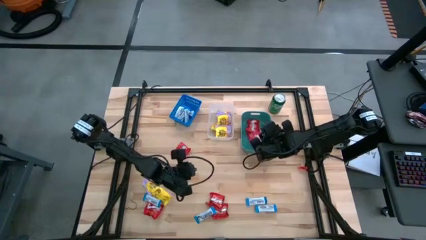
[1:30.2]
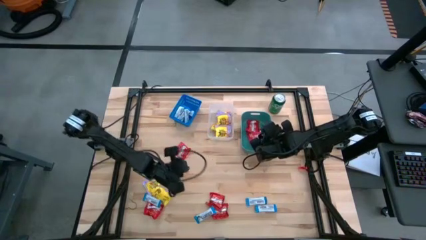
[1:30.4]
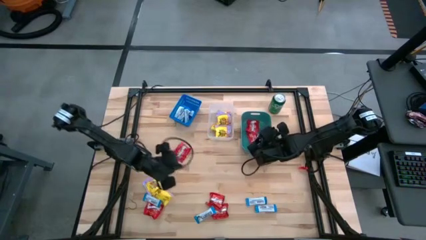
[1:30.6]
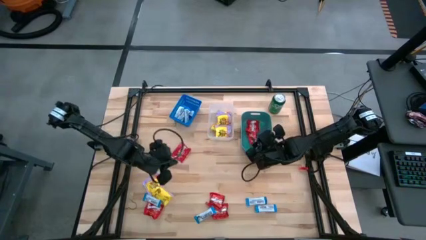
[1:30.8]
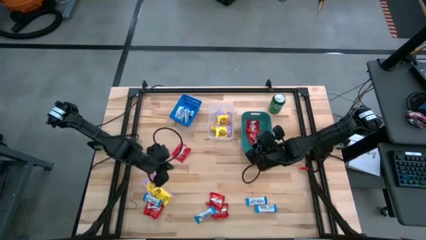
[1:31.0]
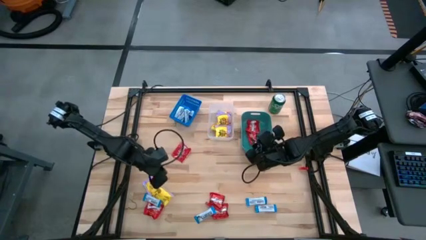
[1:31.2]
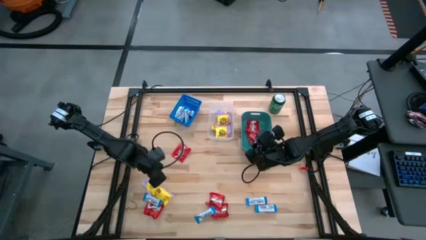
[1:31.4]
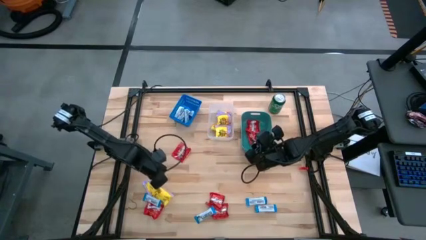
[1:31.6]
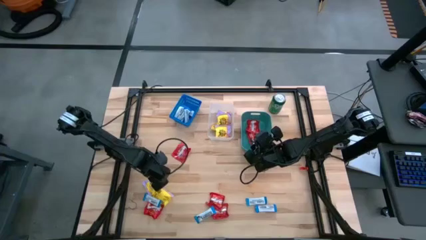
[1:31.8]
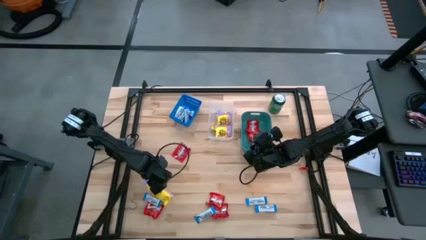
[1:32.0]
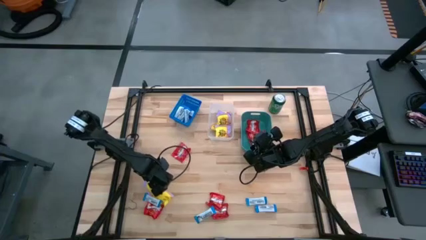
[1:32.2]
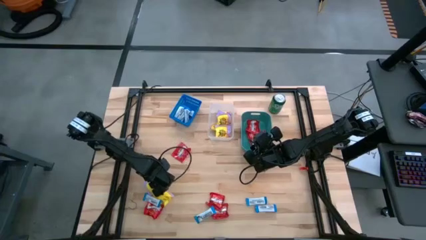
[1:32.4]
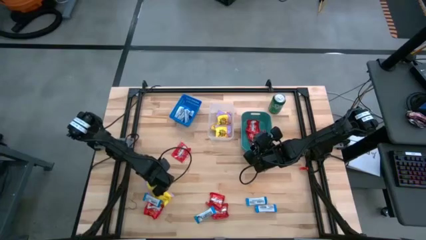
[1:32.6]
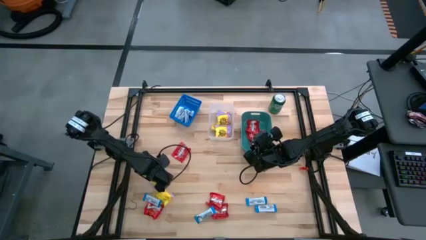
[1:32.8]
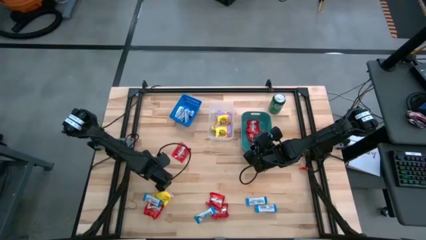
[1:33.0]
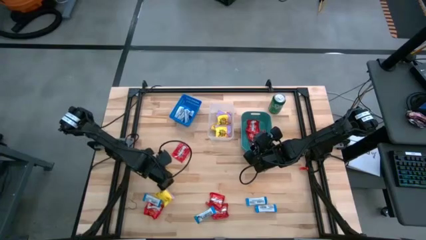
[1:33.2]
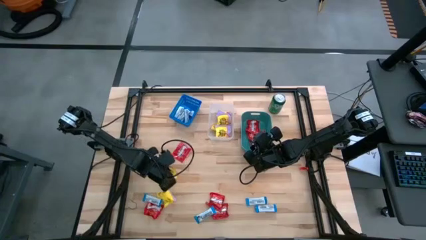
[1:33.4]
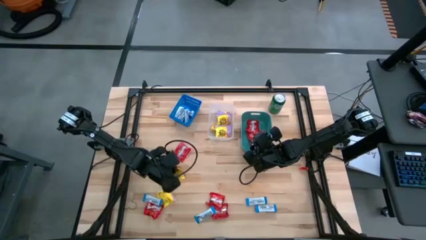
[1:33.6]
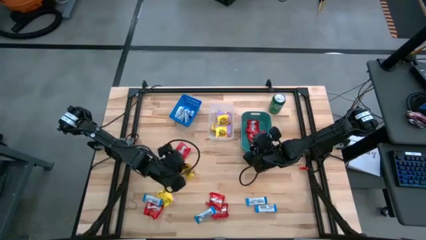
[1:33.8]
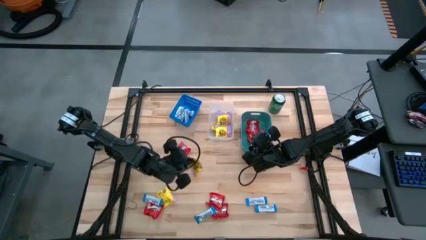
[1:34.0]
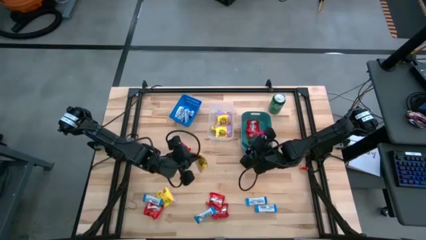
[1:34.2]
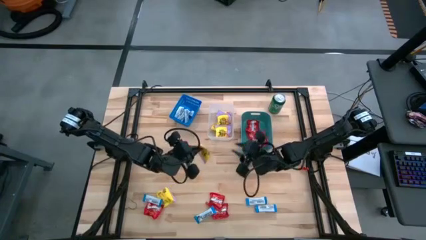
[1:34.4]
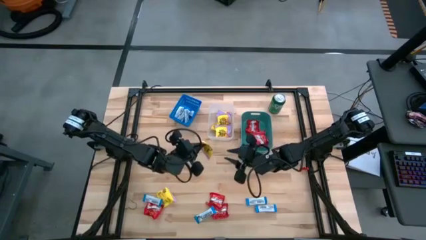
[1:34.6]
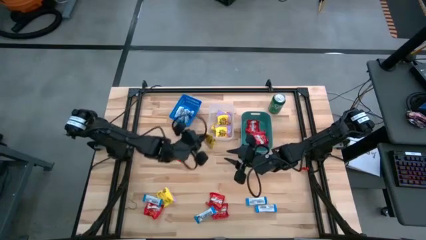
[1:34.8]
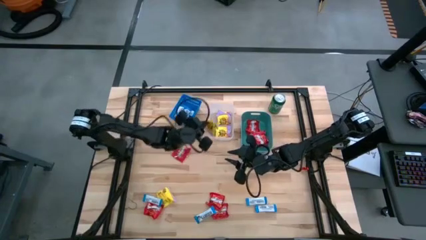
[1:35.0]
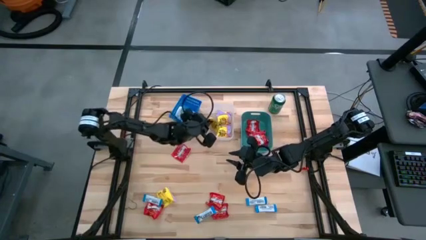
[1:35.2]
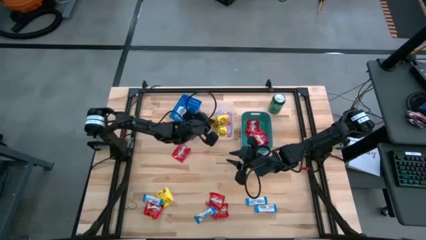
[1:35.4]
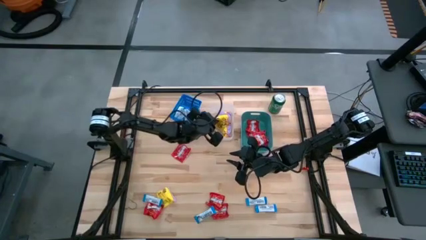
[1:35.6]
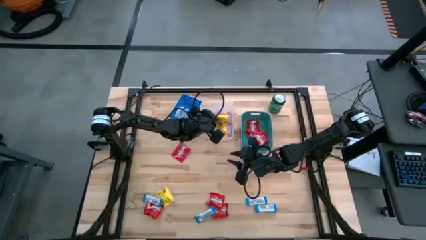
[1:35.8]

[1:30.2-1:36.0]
Task: Sort candy
Put the yellow candy into the transparent bin

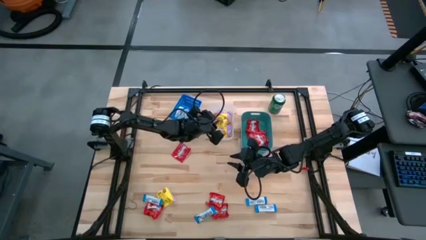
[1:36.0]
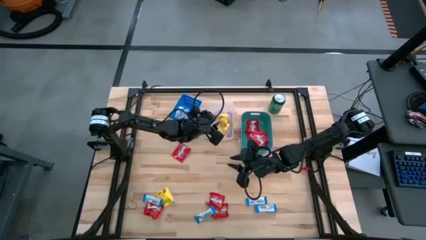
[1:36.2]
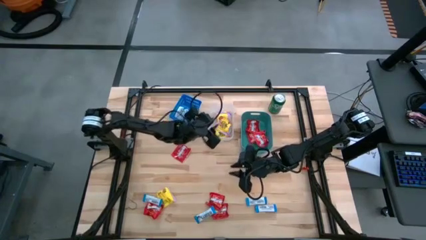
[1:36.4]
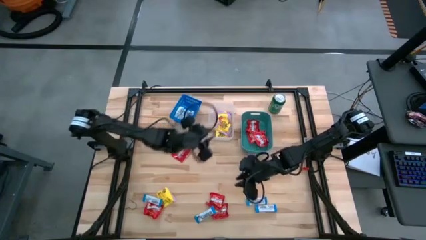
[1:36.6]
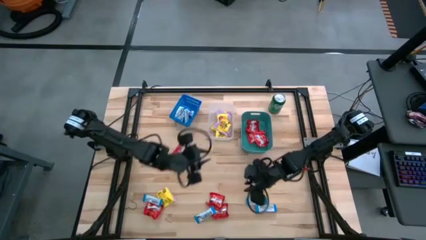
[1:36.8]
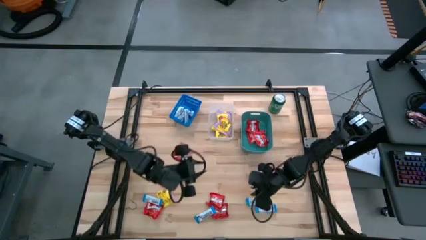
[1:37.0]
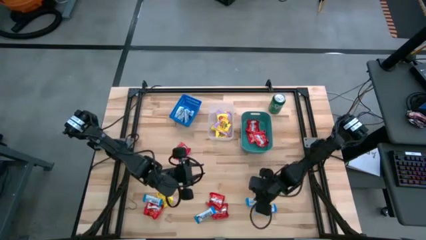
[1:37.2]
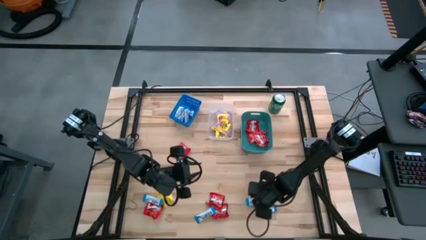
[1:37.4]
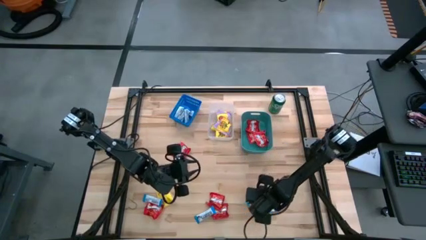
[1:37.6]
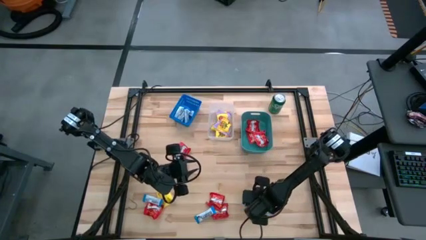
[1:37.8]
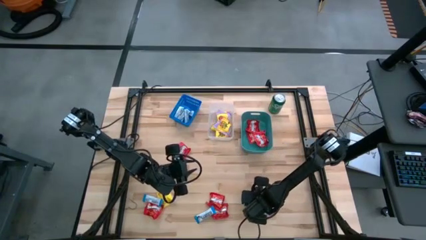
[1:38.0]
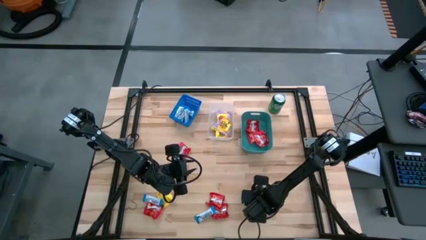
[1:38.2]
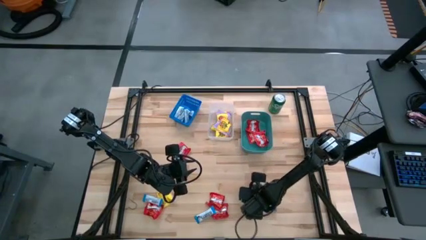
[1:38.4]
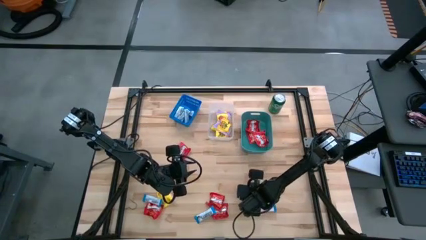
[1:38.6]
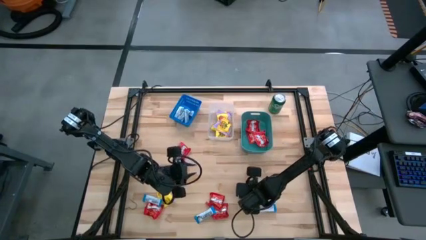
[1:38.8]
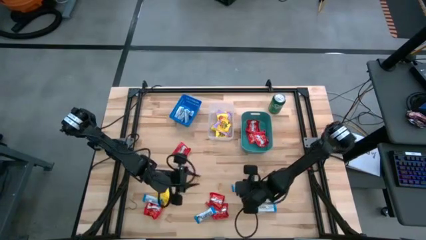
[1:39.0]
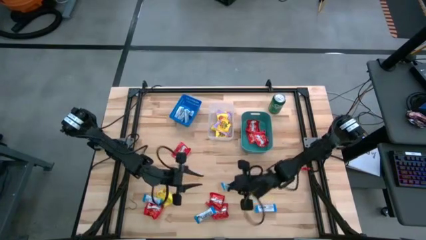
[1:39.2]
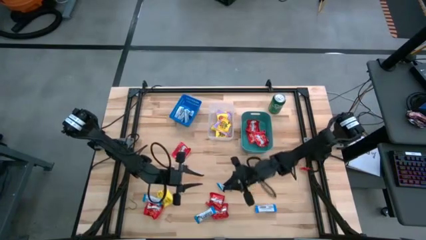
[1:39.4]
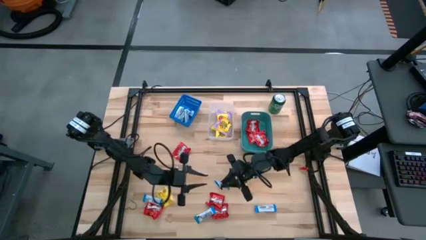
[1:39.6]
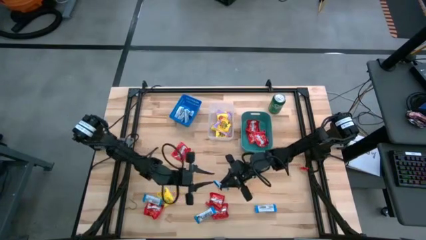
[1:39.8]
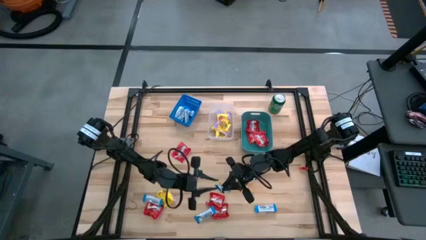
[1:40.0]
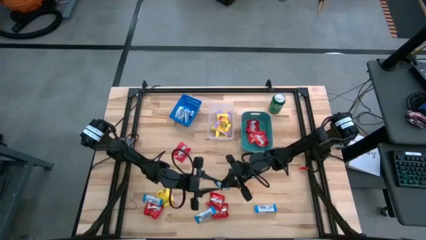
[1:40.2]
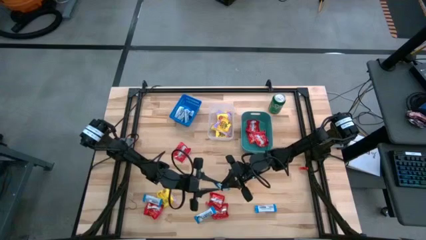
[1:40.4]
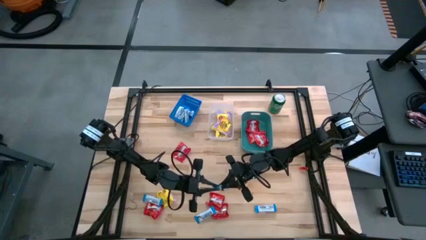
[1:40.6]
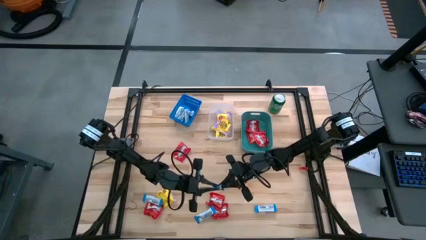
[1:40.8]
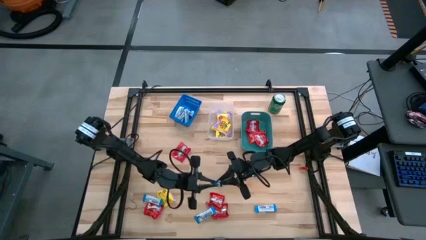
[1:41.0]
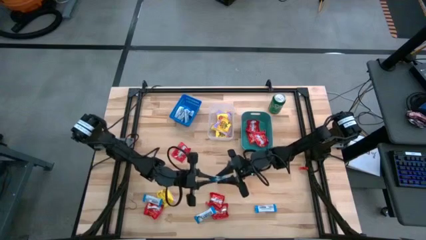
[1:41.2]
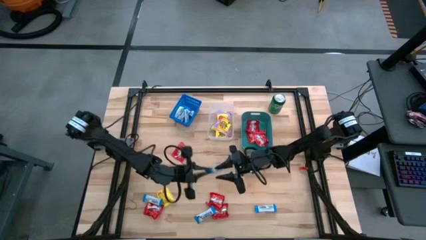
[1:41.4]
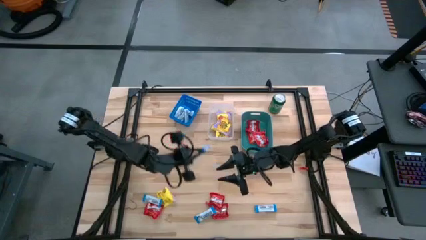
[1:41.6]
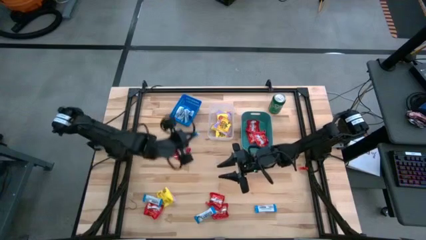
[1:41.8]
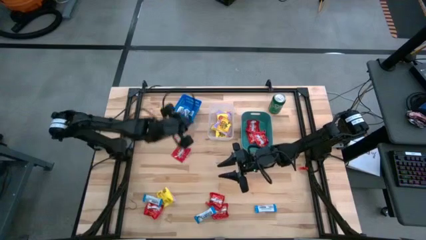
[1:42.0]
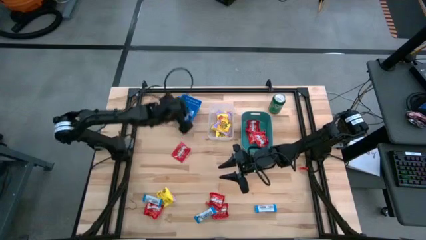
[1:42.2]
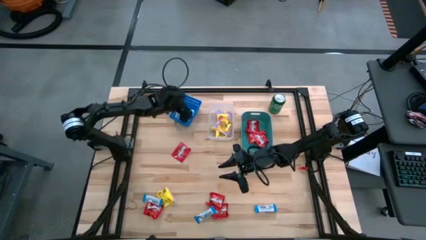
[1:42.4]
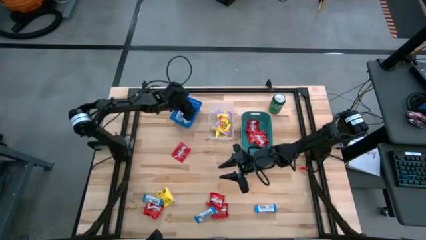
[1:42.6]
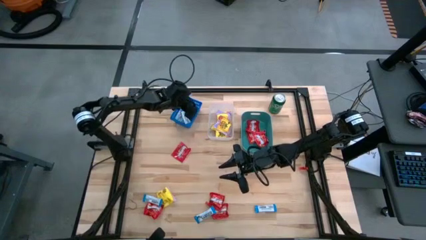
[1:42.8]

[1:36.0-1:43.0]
Put the white chocolate bar into the blue bin
